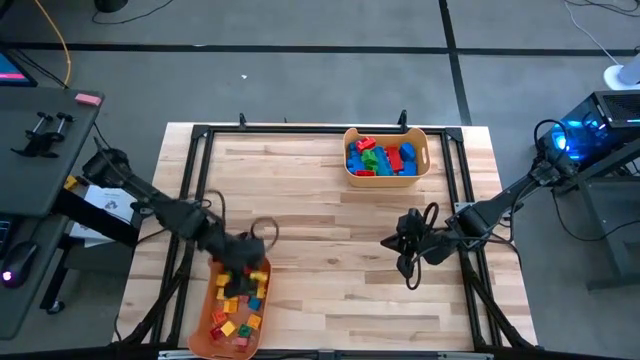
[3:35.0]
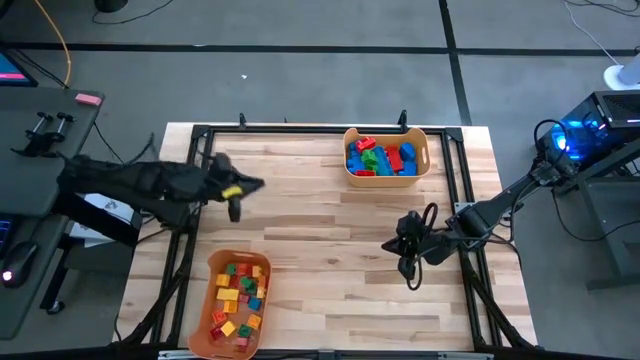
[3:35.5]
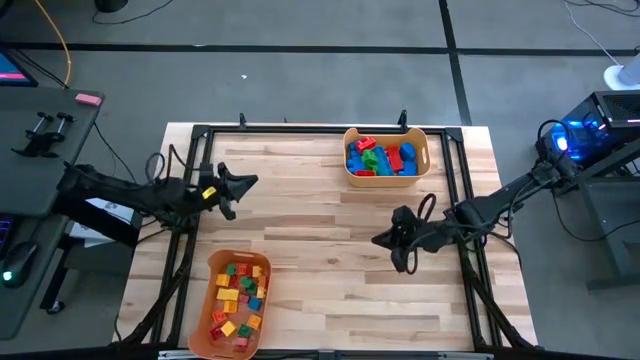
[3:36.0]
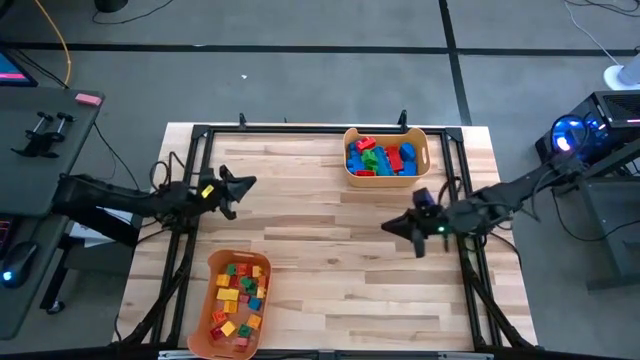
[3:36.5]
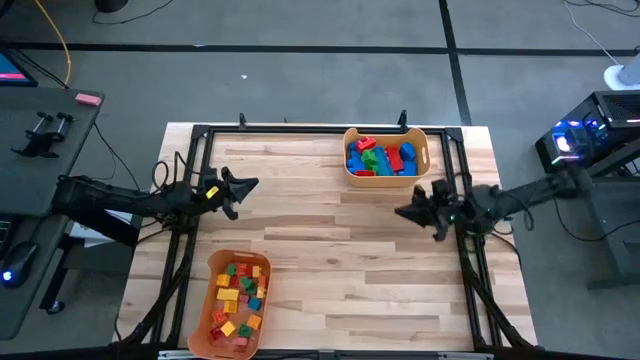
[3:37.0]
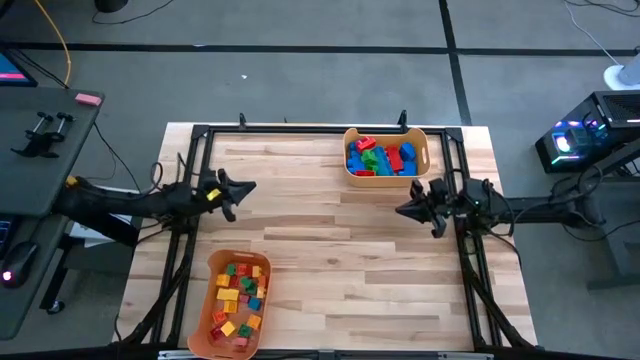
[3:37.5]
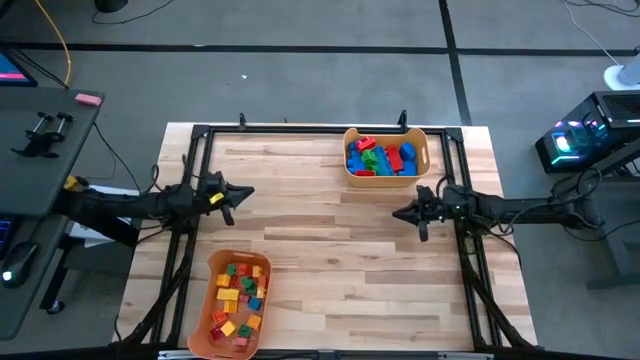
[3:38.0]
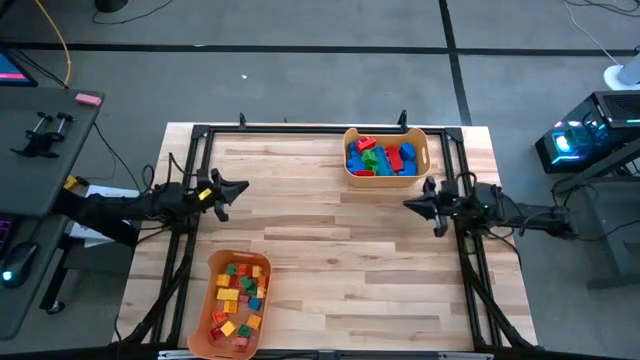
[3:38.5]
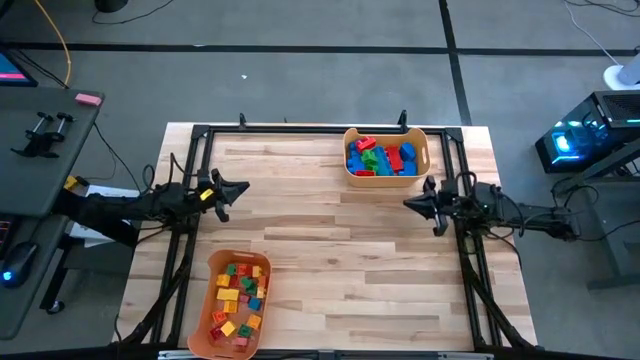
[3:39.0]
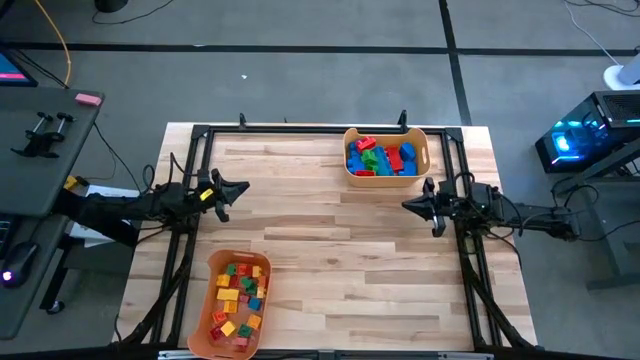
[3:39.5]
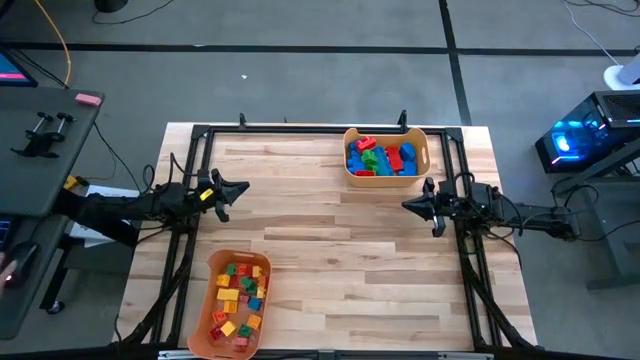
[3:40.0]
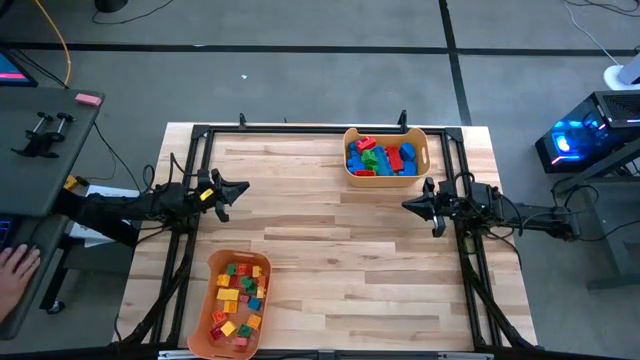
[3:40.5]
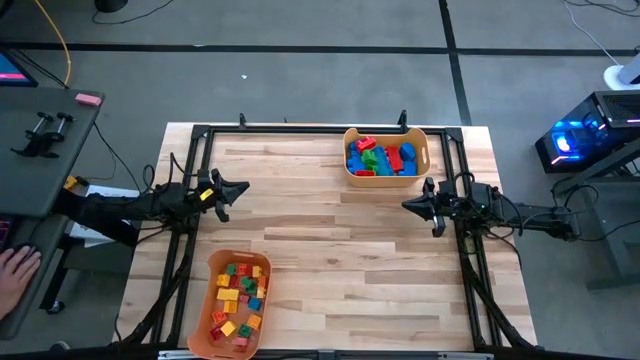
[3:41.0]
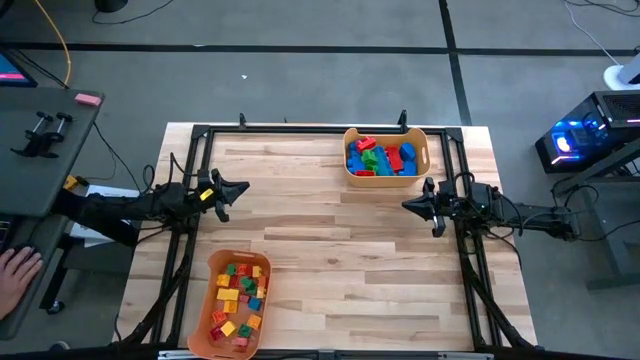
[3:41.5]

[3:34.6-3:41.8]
Task: Sort blocks by size
Return to Home Position

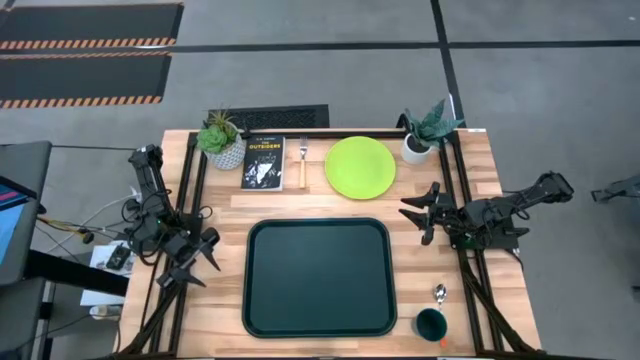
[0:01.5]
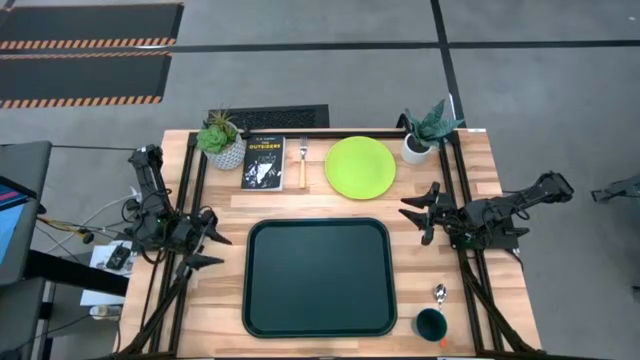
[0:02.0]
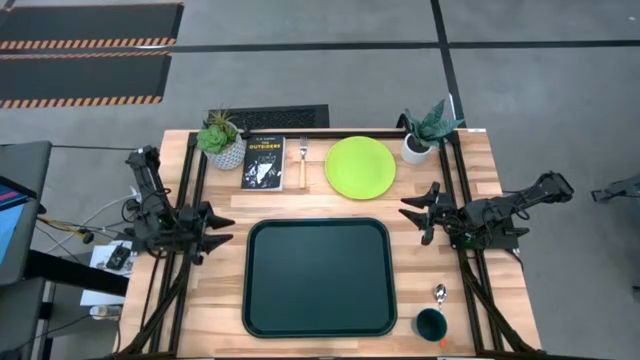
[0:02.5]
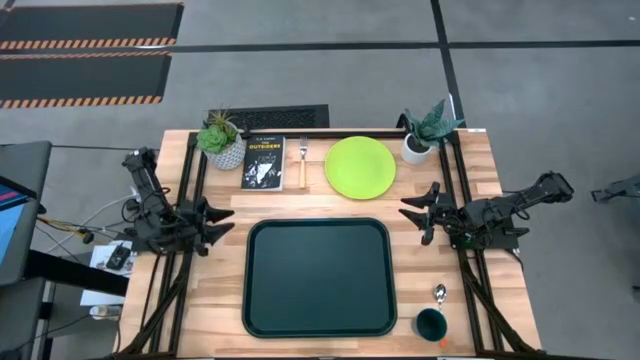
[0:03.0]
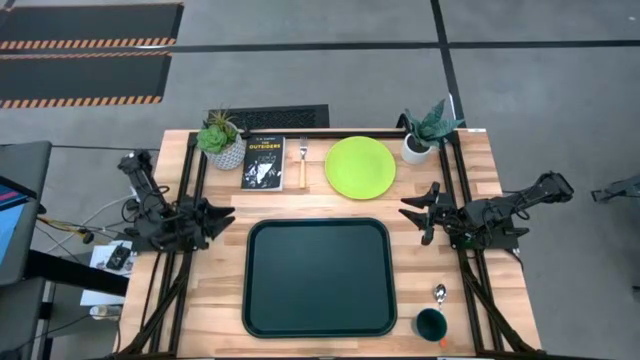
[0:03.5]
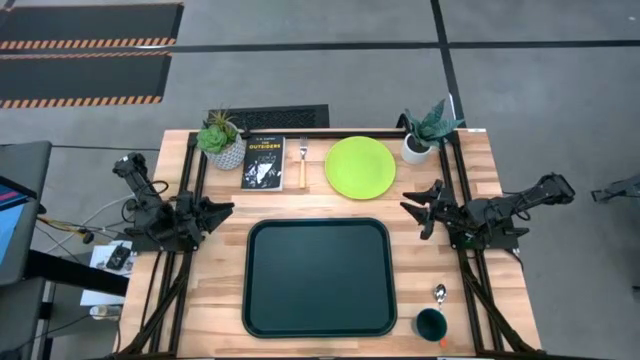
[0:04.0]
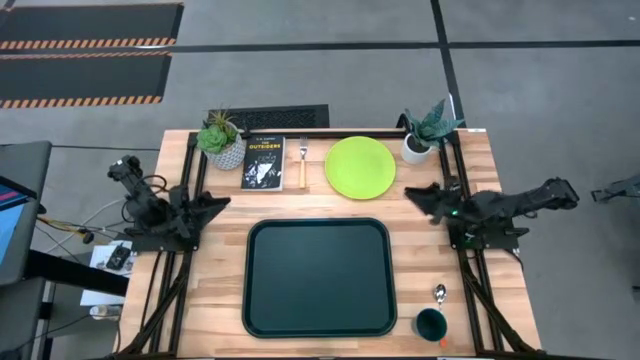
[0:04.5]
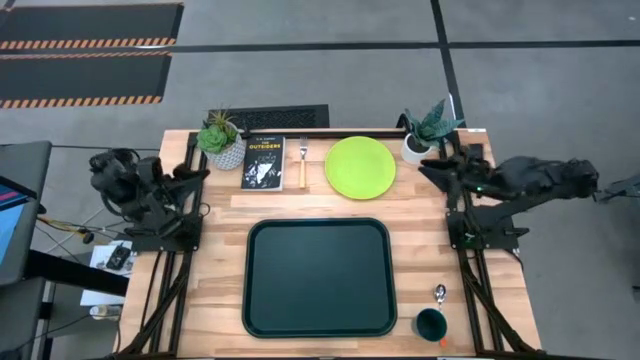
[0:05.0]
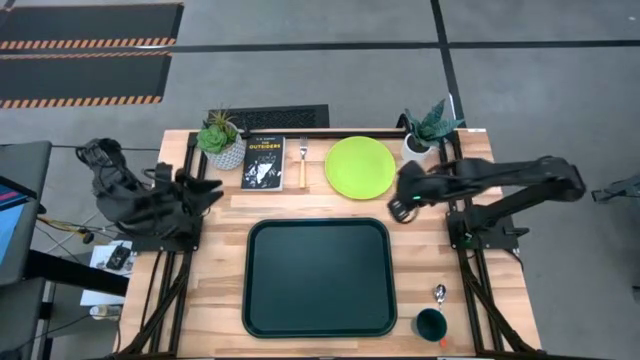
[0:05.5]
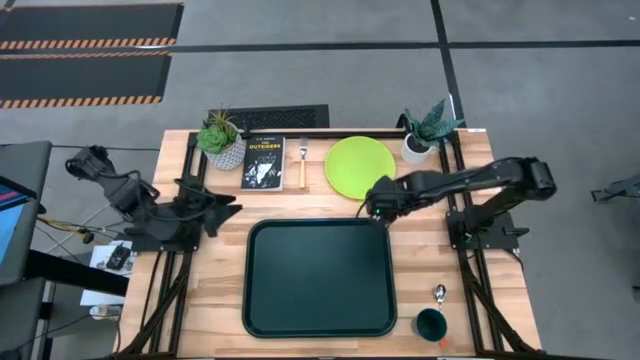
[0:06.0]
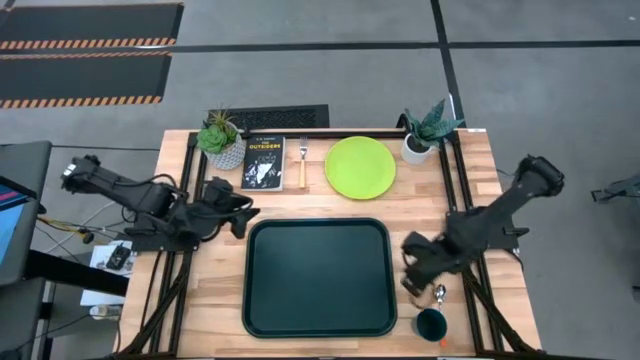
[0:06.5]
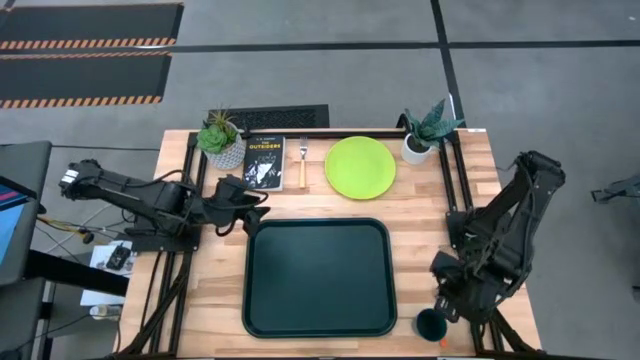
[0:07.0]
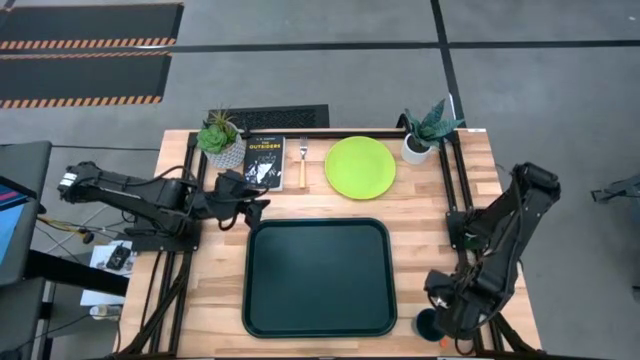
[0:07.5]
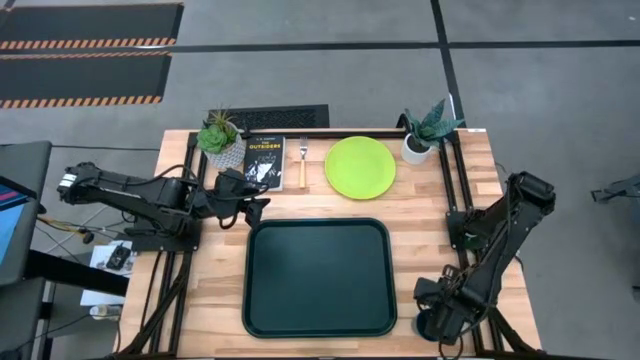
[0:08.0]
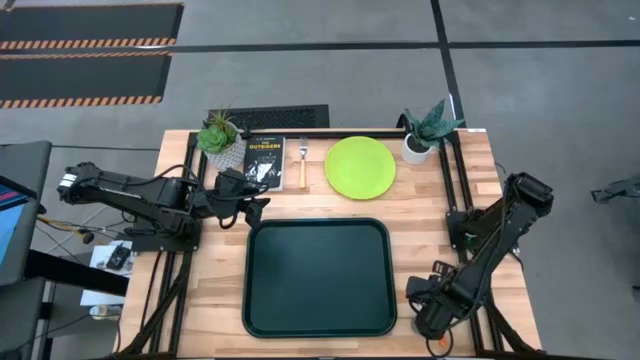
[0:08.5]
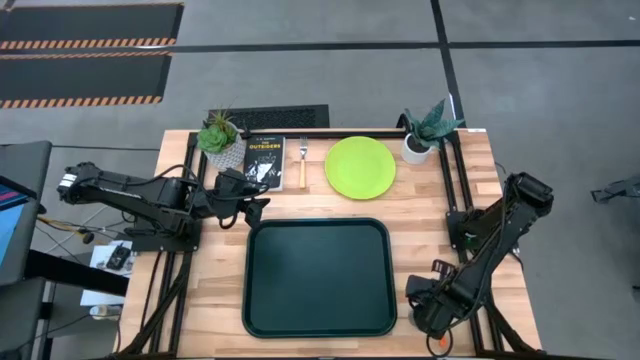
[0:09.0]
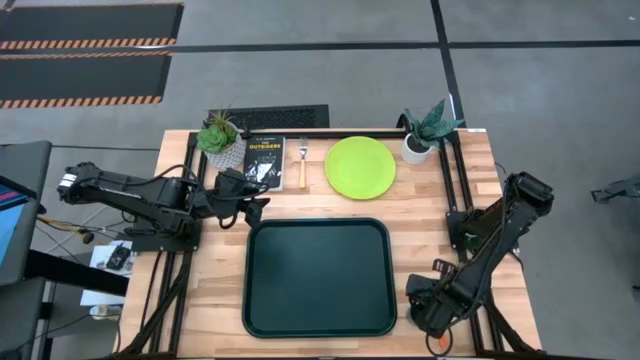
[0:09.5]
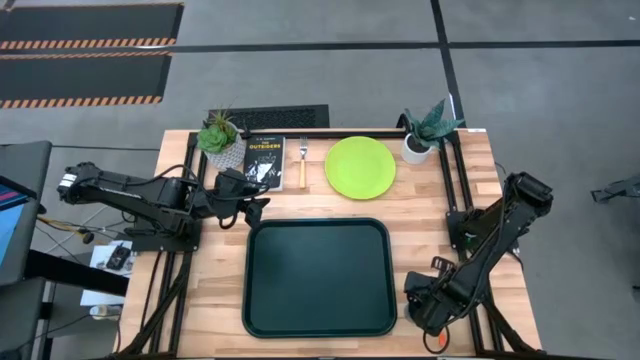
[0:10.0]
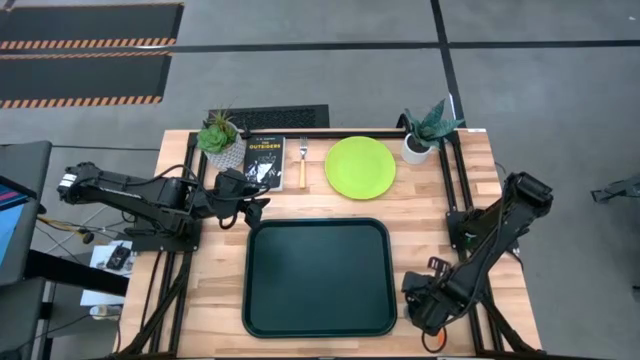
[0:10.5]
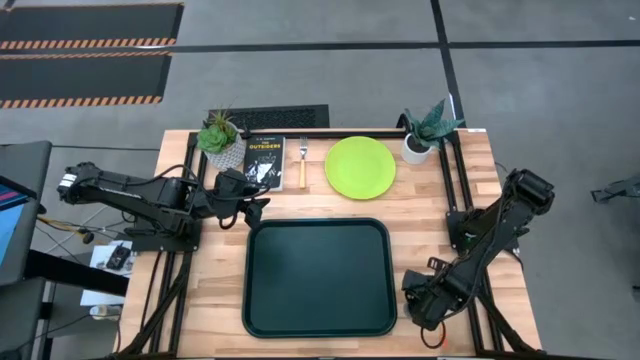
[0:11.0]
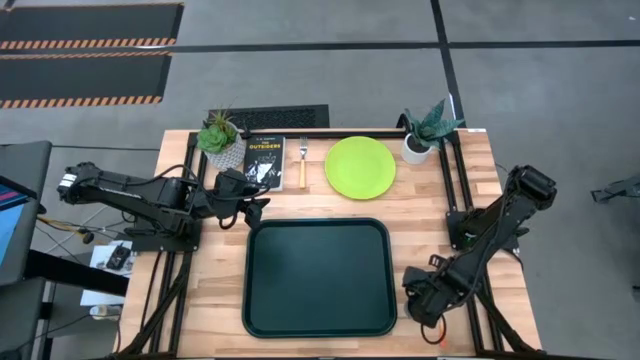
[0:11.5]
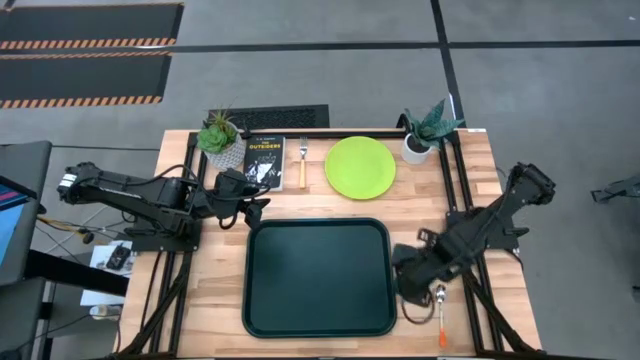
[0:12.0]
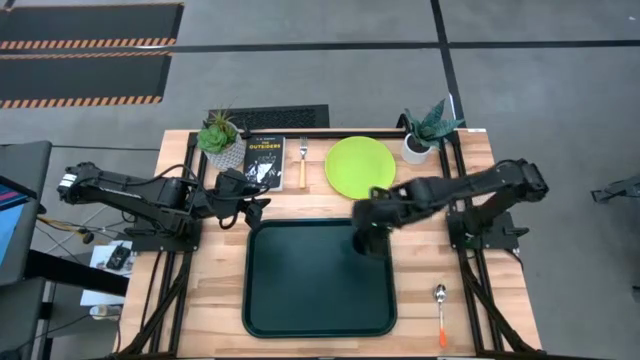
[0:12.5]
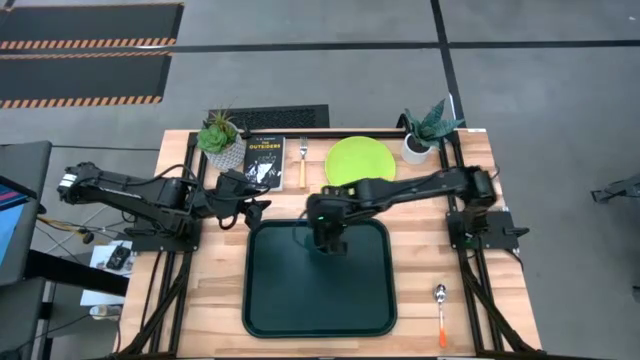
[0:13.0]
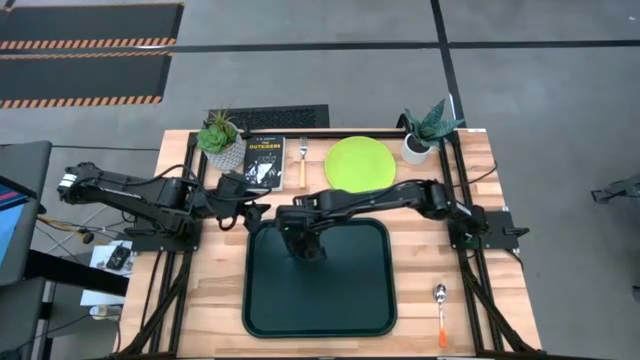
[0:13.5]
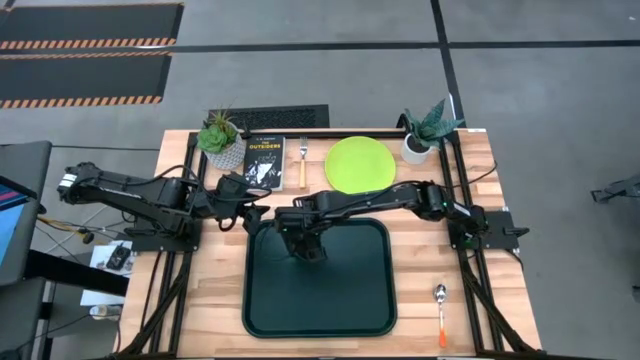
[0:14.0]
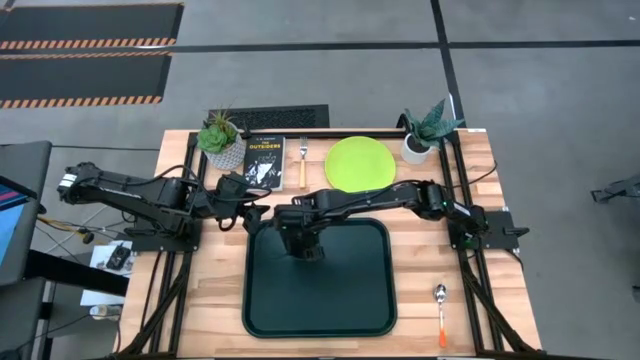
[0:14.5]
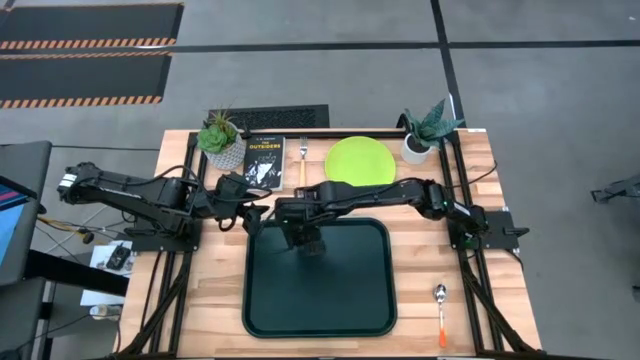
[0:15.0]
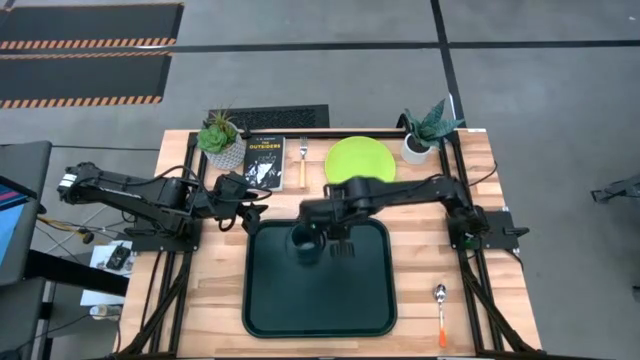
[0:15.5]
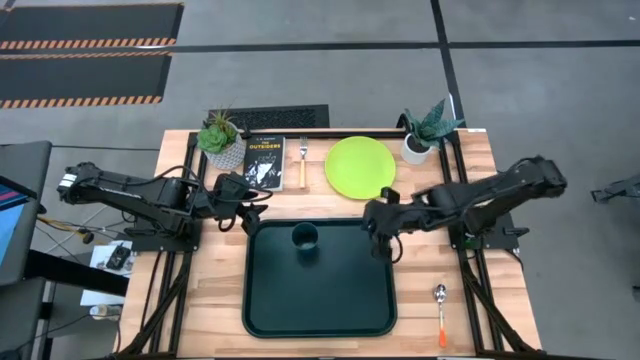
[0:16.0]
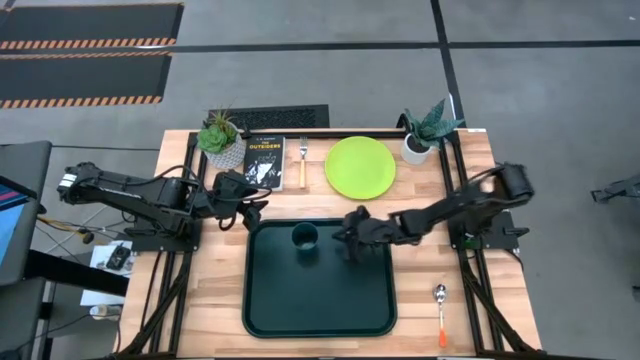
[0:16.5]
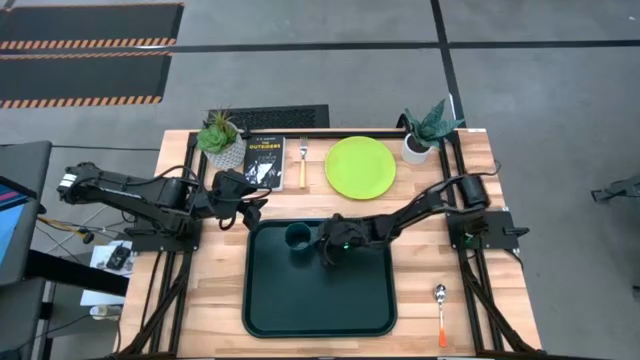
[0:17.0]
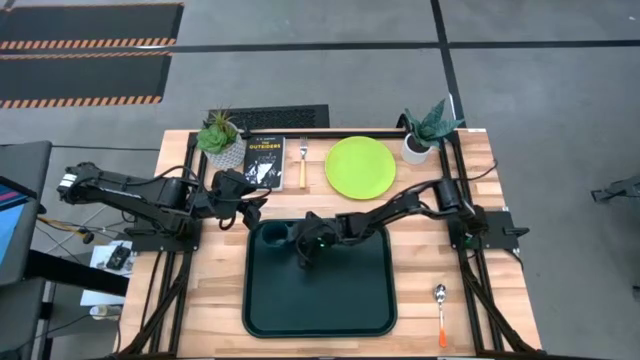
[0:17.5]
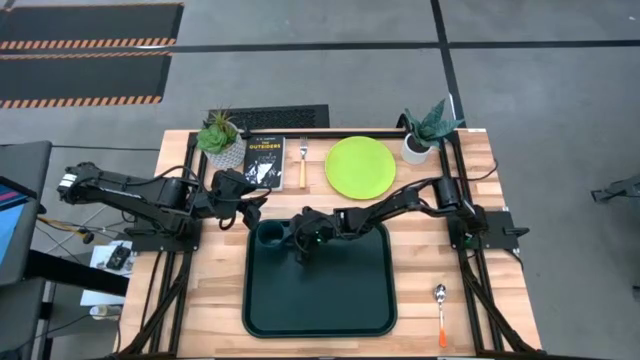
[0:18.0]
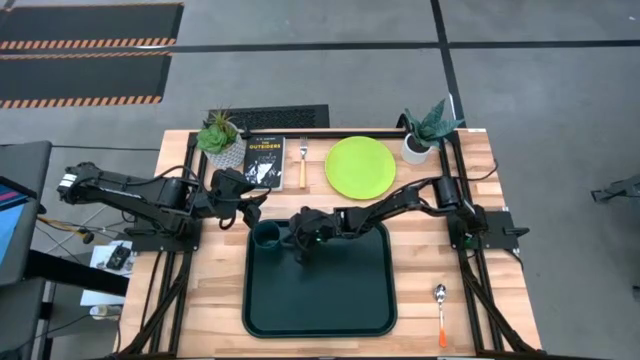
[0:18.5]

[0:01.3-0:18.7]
Task: Pick and place plate/cup/fork/spoon on tray
Put the green glass onto the black tray
